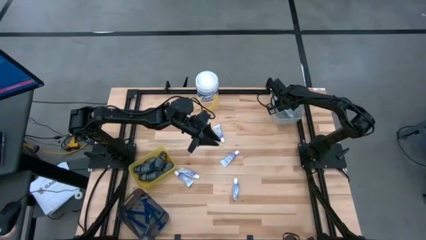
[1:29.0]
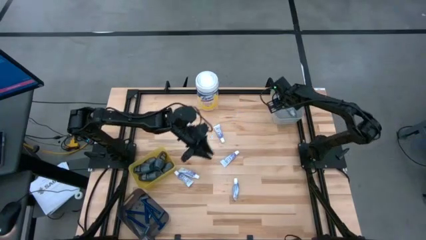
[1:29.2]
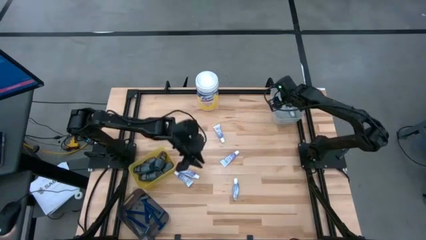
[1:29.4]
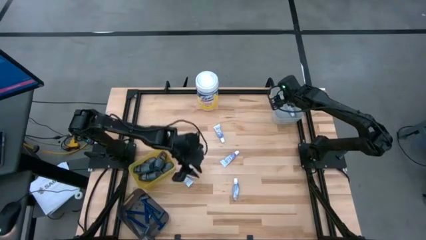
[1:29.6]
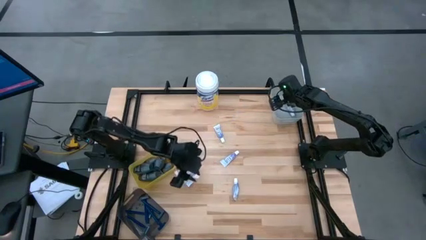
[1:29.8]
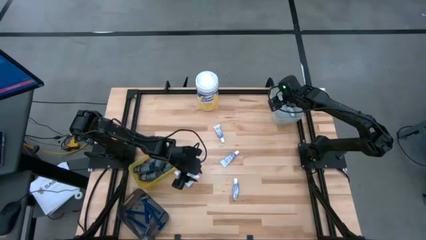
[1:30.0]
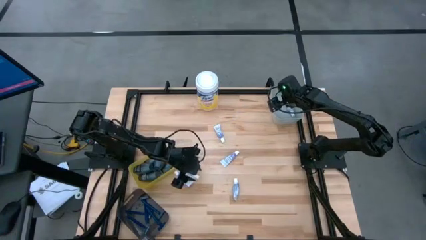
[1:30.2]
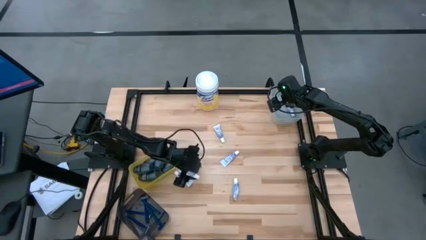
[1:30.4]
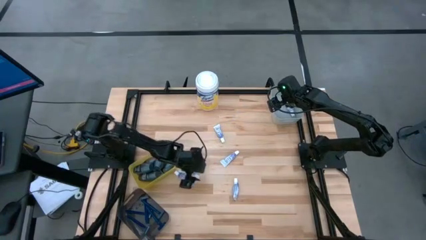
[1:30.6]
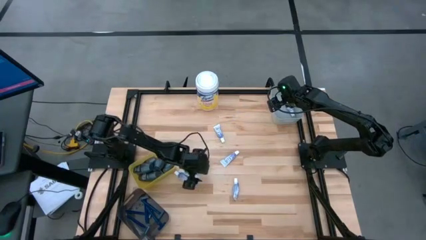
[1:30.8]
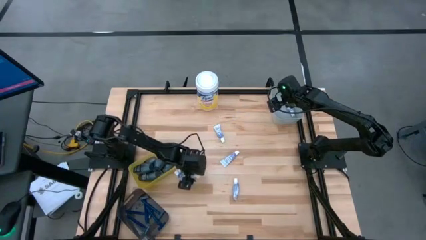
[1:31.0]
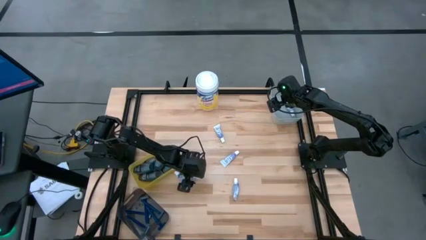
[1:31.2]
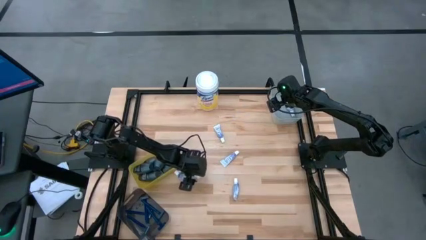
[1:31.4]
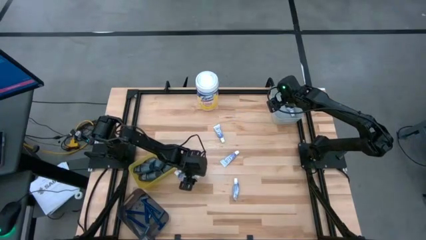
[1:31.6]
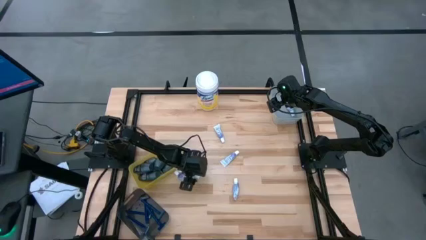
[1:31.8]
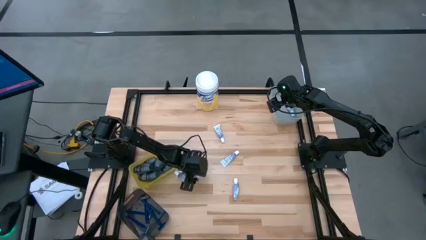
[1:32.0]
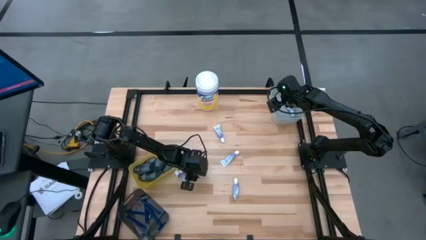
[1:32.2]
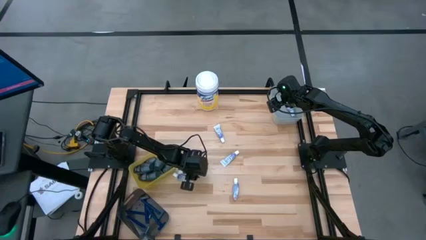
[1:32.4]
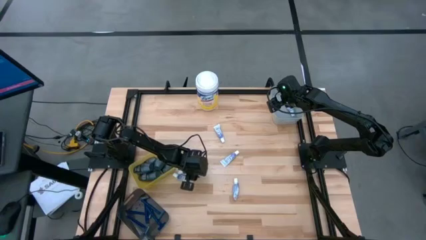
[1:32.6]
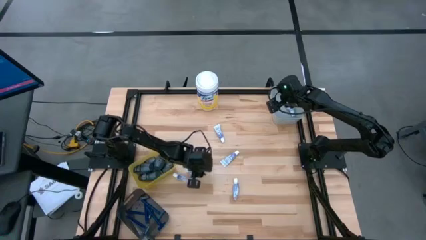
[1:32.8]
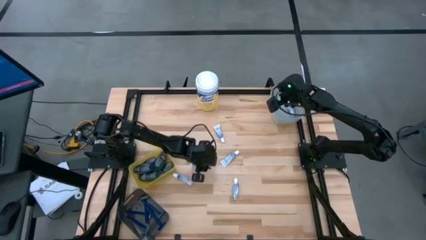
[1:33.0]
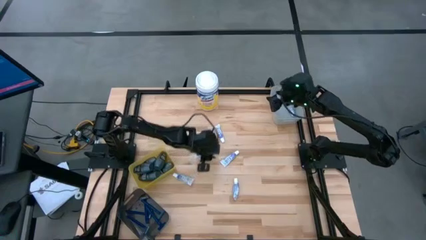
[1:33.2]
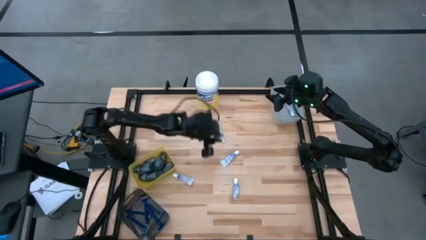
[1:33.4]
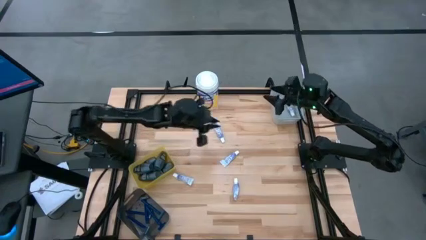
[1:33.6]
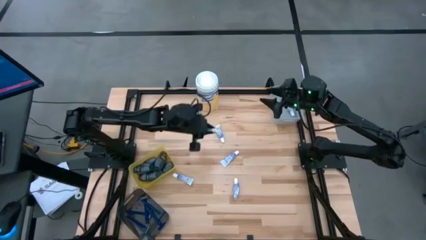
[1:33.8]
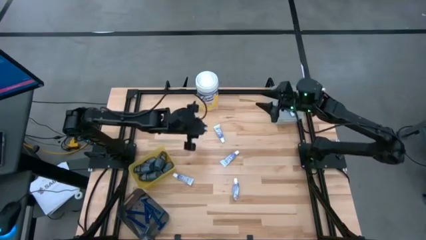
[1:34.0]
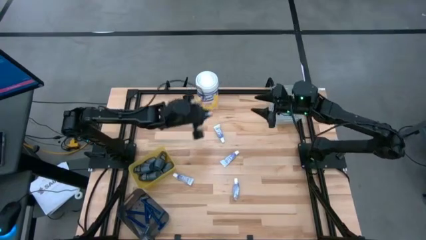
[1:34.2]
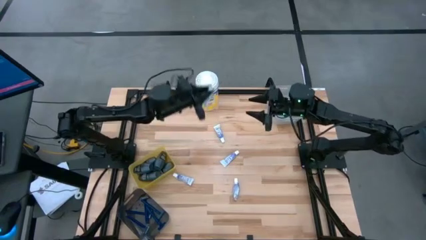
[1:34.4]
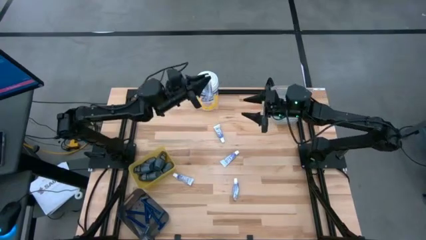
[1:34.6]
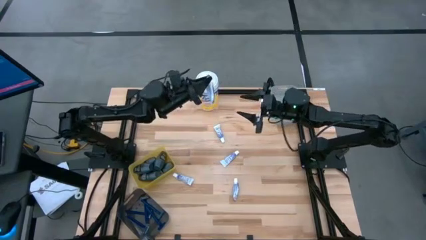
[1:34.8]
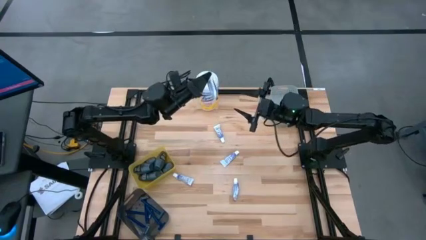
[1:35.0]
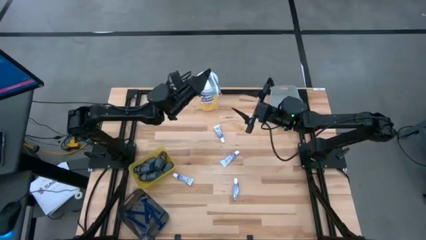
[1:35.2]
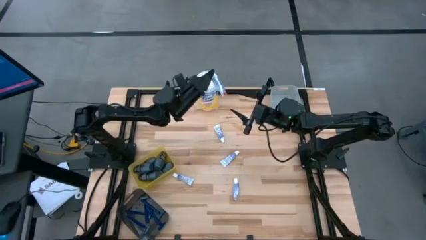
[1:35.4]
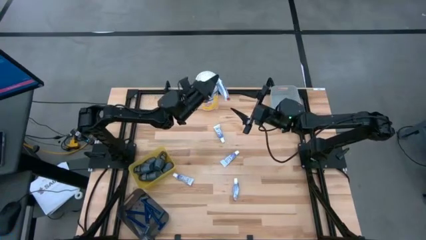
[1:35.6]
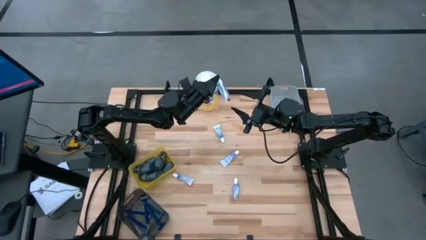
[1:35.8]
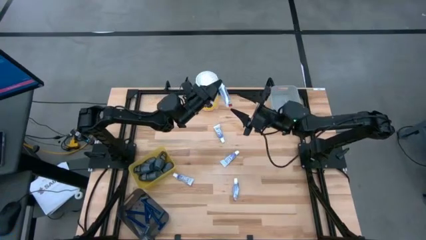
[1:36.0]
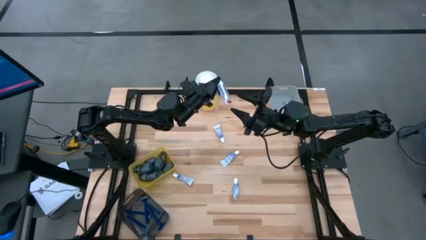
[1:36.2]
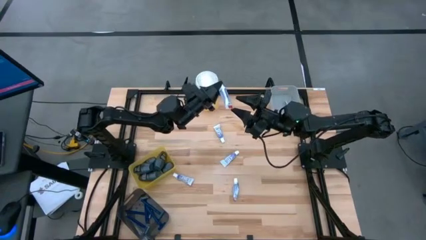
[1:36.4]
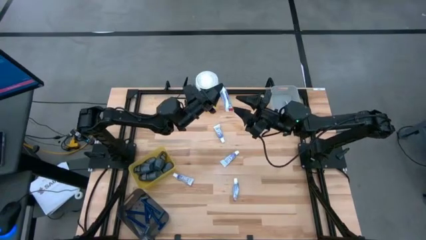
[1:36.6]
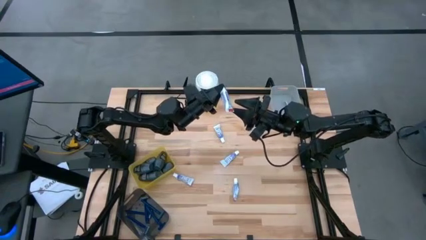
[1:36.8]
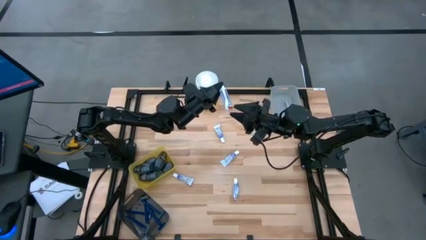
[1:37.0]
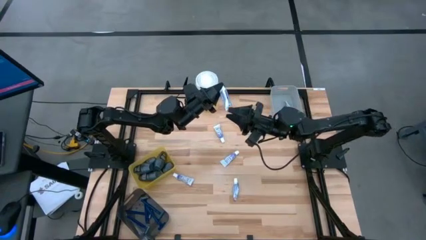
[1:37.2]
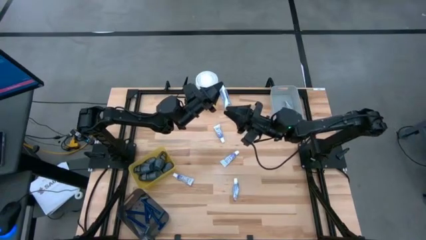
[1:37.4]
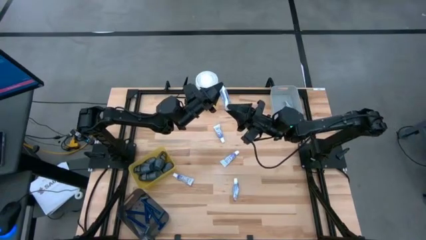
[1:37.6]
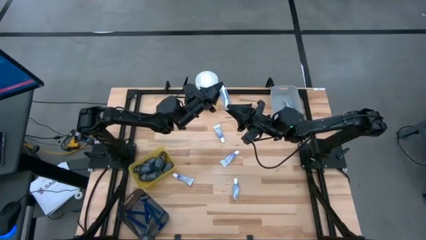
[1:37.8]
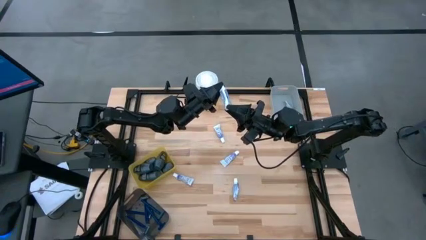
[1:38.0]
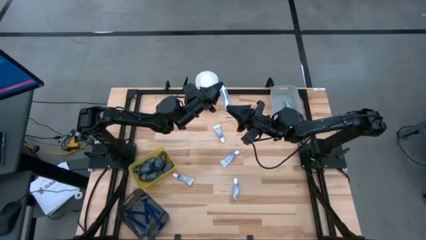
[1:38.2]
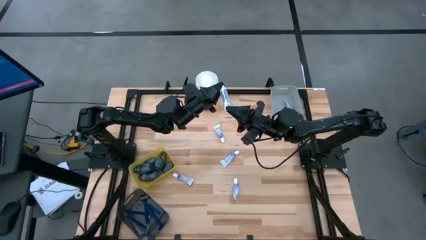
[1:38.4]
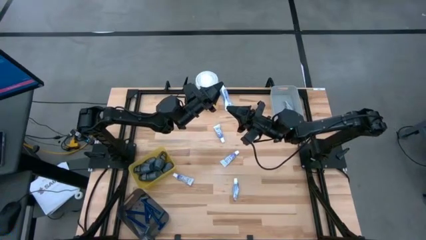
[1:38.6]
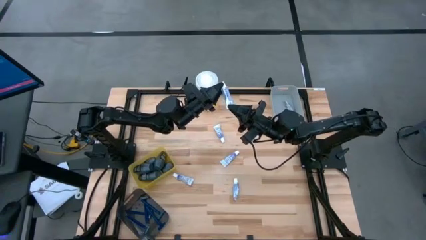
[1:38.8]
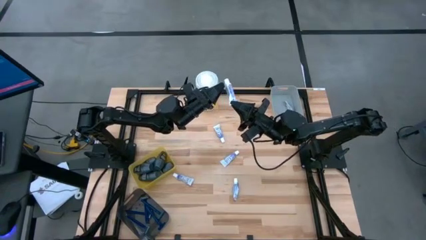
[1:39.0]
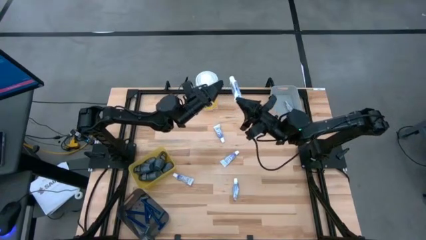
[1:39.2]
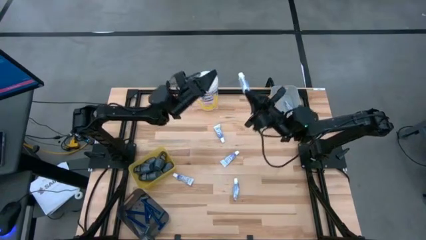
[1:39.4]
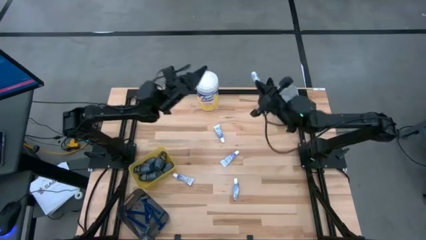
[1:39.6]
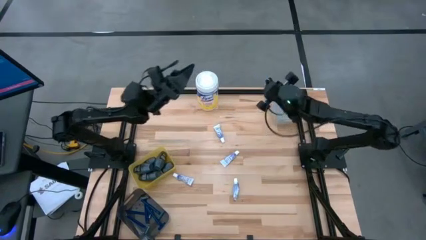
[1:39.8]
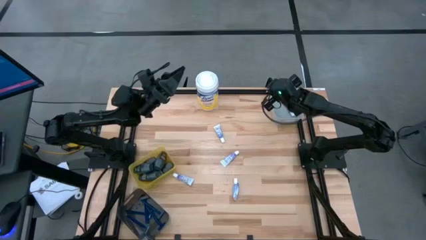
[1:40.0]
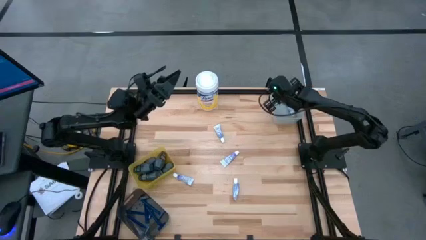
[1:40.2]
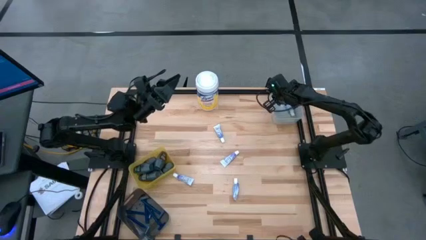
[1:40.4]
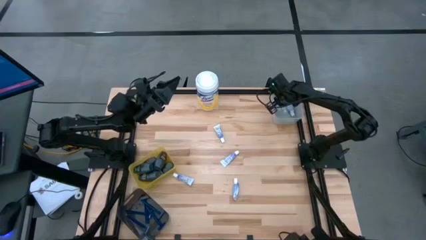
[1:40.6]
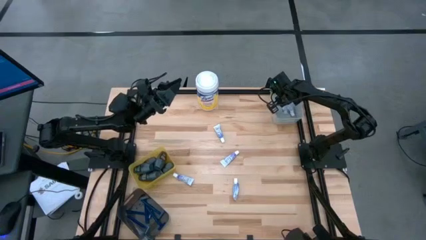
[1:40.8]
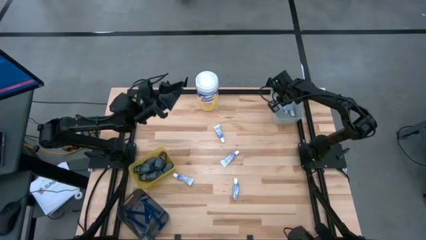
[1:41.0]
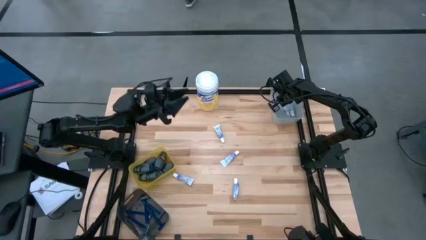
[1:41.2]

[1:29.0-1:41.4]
Task: Pick & Place Travel size toiletries
Put the white toothpaste into the gray bin

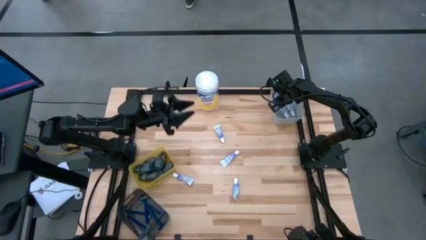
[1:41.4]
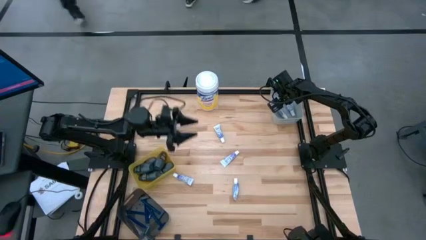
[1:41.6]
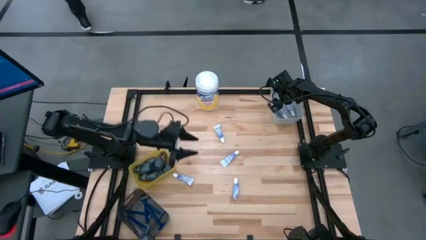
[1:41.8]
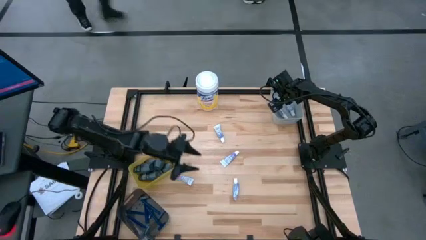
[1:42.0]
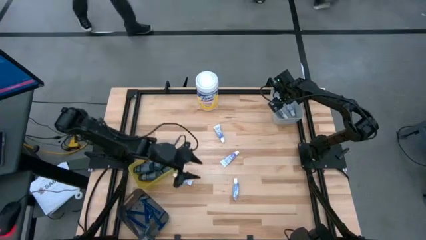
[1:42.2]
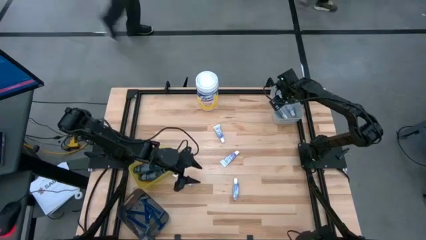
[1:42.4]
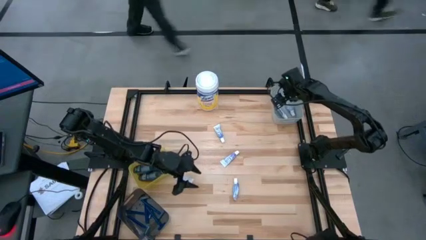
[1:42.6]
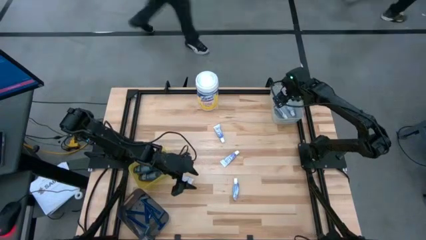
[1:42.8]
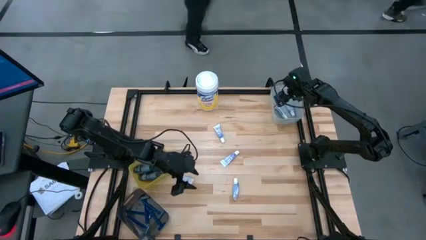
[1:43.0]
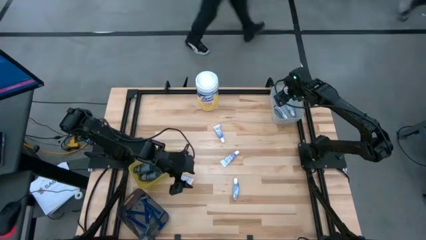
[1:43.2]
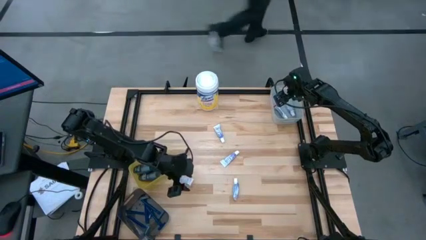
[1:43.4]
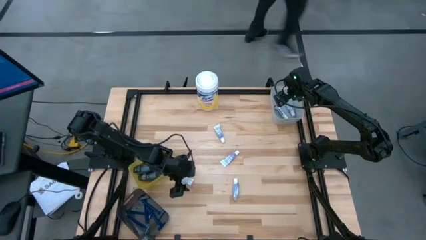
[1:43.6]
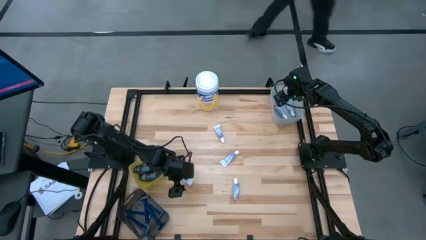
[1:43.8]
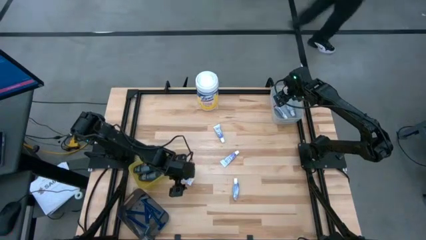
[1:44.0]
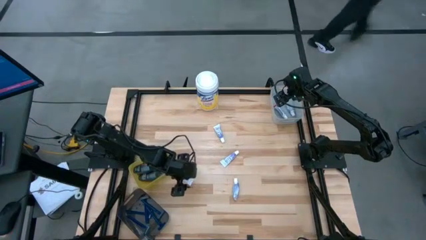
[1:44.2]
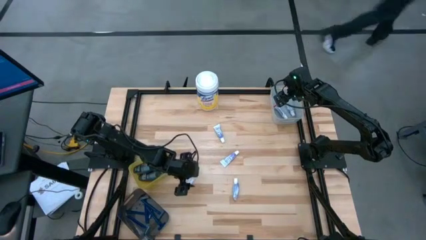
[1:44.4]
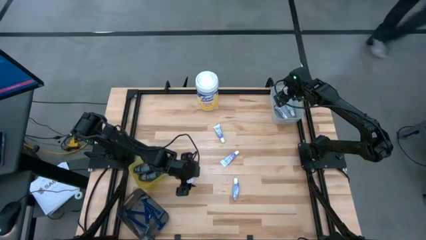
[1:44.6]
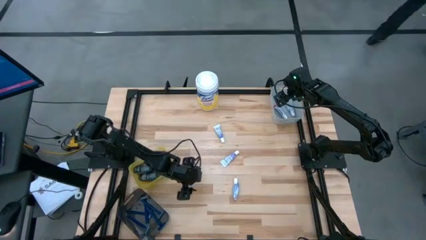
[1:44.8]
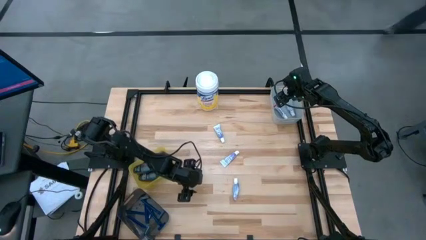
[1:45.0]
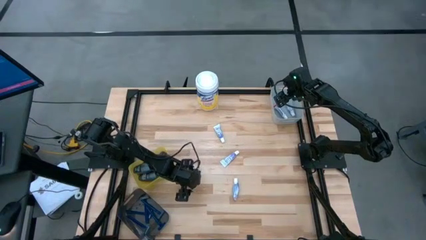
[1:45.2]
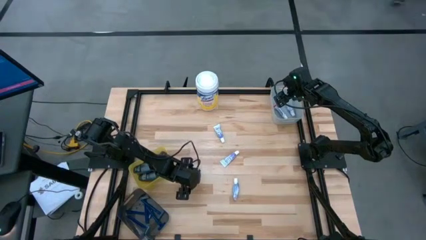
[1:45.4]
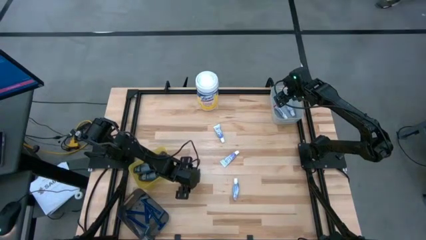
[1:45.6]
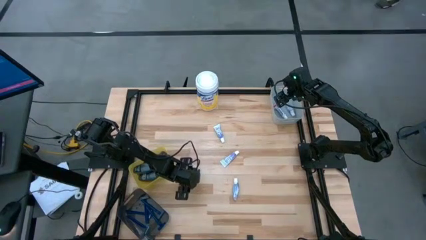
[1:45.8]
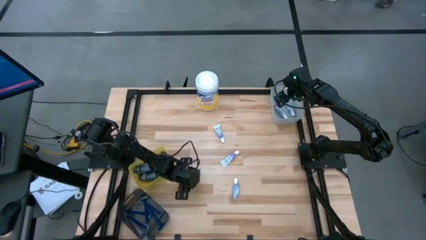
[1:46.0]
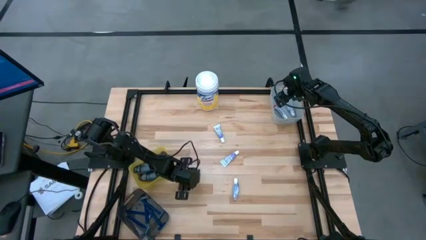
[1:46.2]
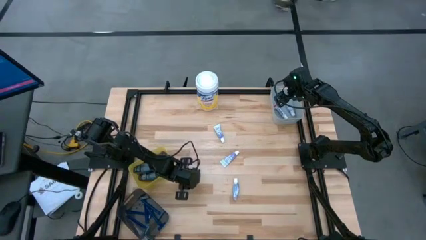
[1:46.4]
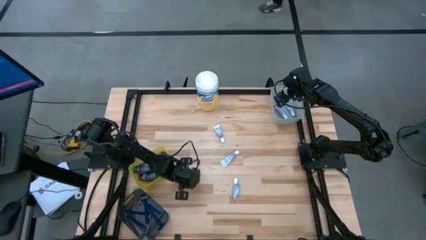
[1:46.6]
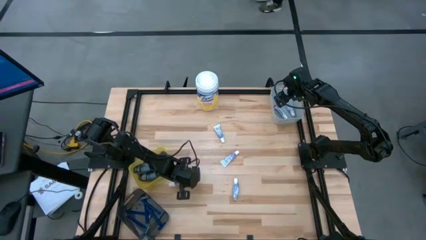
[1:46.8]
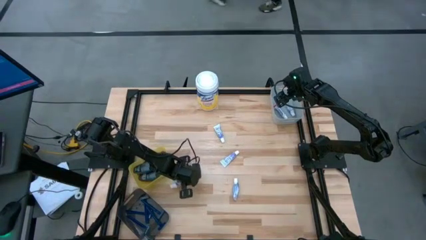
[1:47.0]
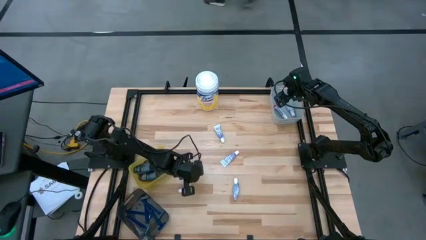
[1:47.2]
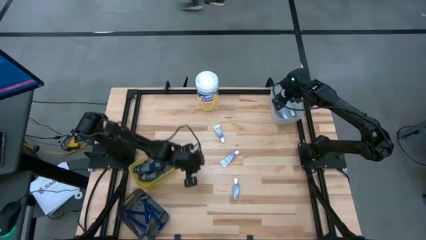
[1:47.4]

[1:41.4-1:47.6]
Put the white toothpaste into the gray bin
